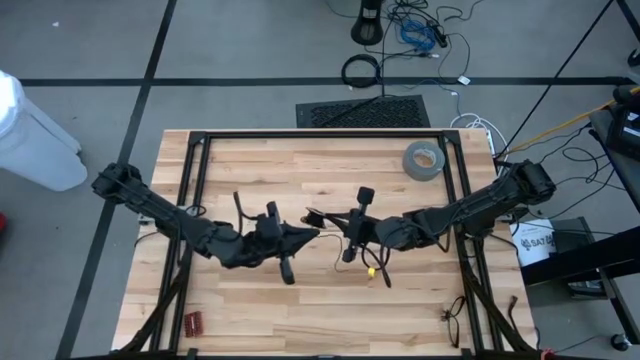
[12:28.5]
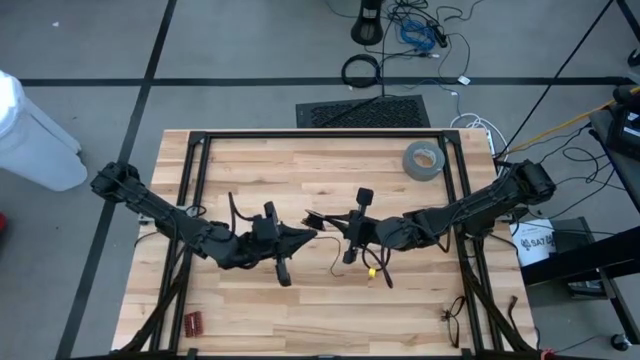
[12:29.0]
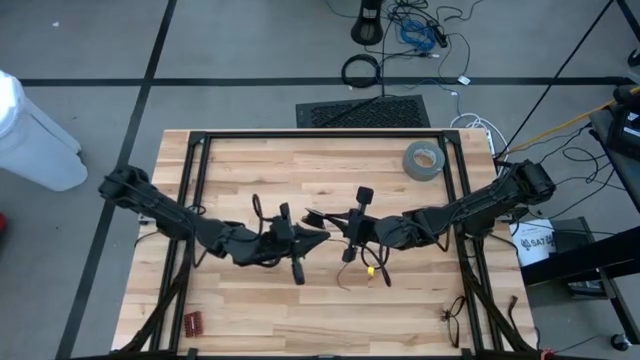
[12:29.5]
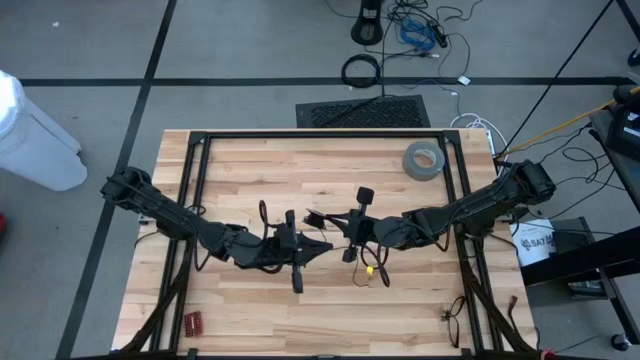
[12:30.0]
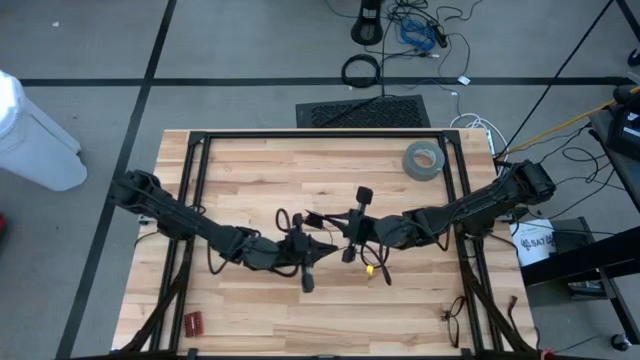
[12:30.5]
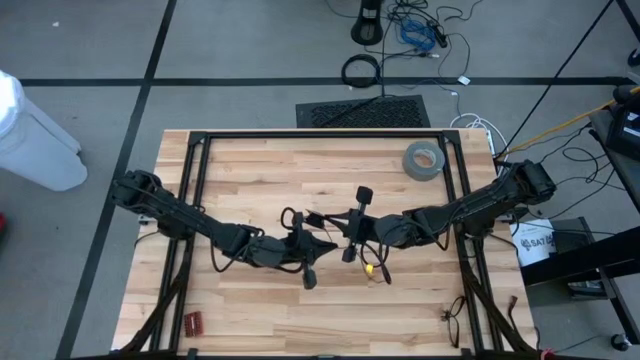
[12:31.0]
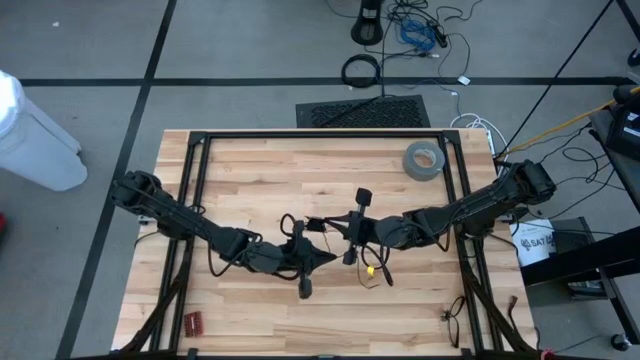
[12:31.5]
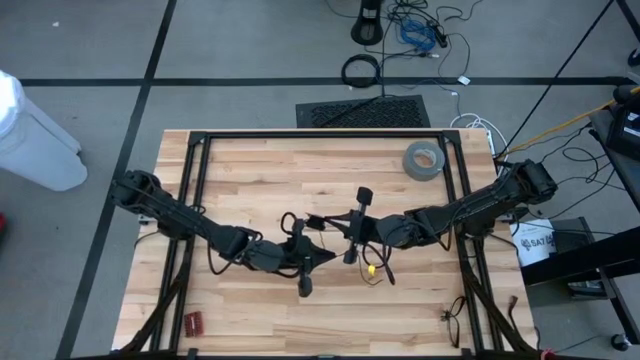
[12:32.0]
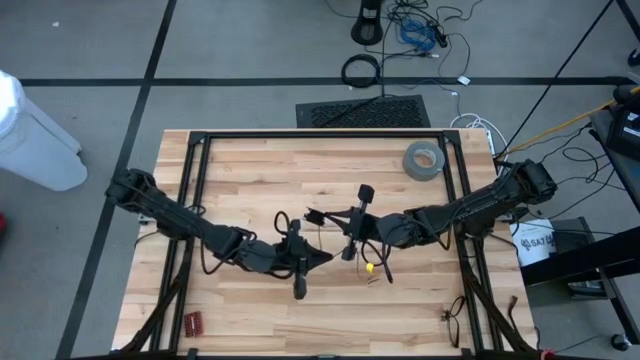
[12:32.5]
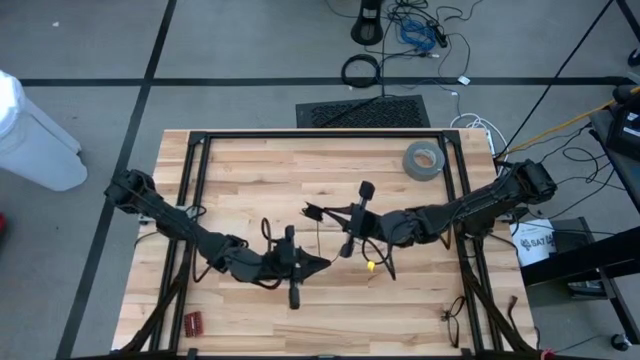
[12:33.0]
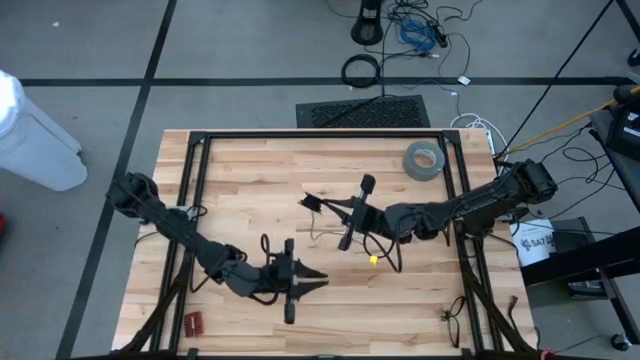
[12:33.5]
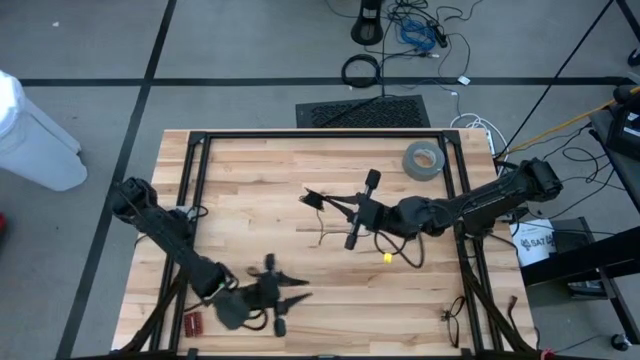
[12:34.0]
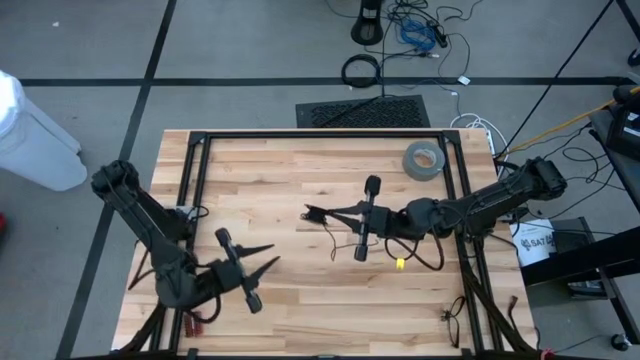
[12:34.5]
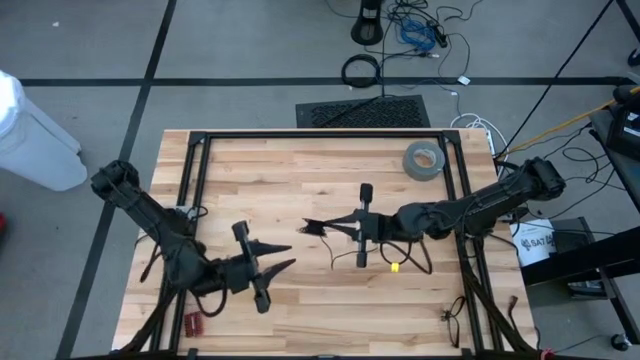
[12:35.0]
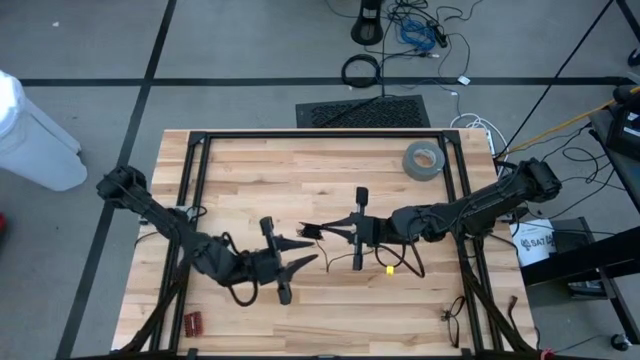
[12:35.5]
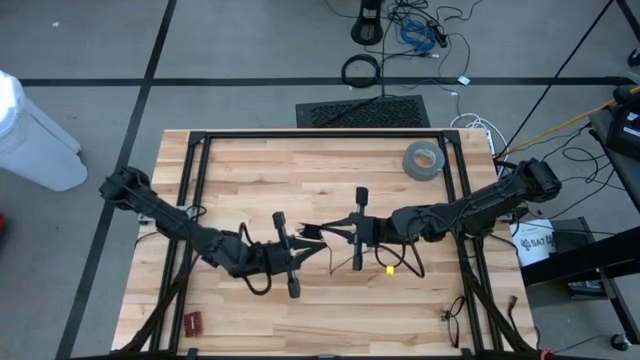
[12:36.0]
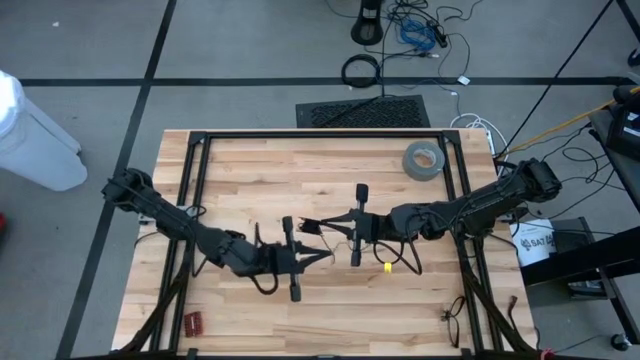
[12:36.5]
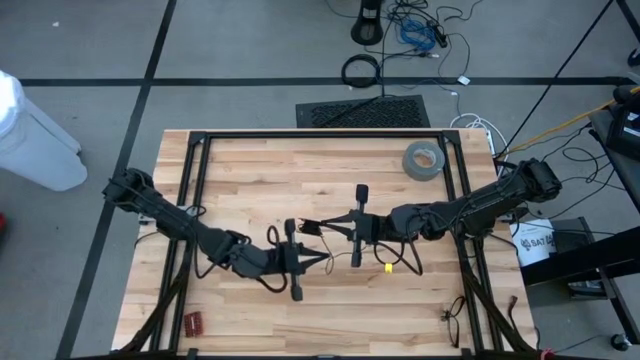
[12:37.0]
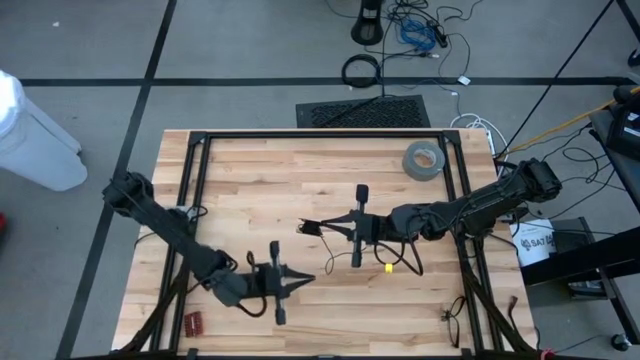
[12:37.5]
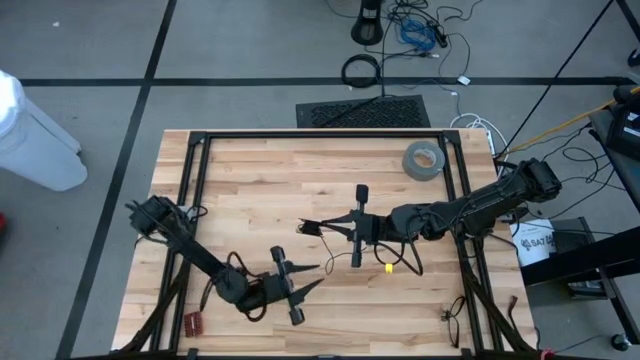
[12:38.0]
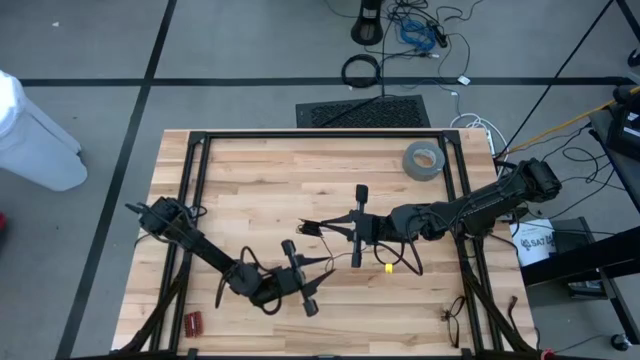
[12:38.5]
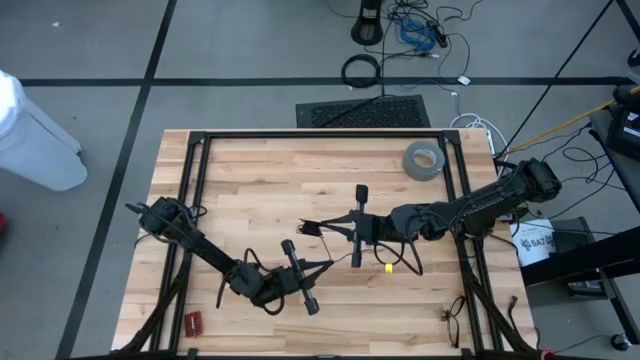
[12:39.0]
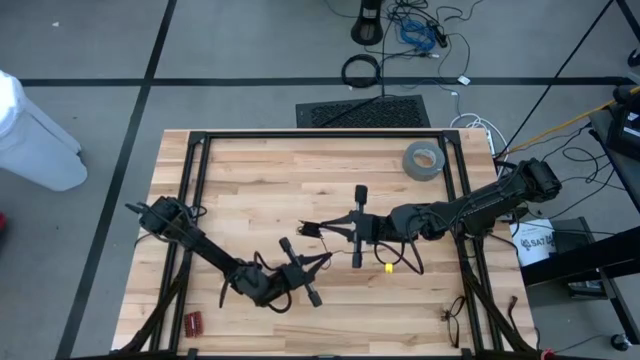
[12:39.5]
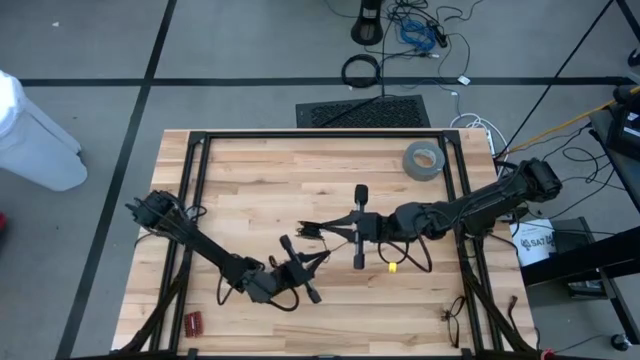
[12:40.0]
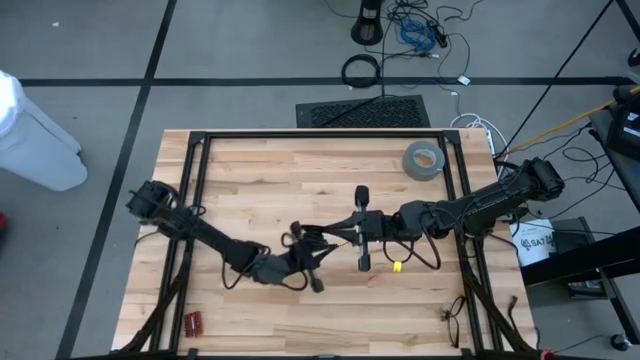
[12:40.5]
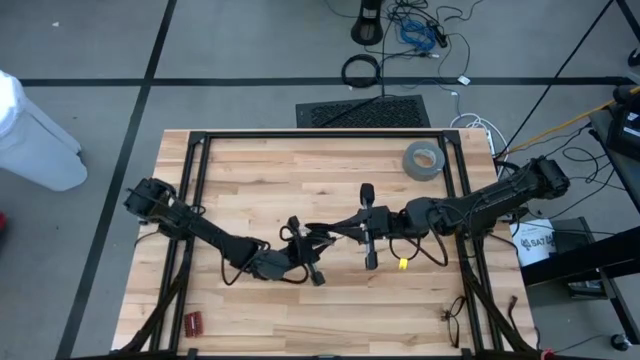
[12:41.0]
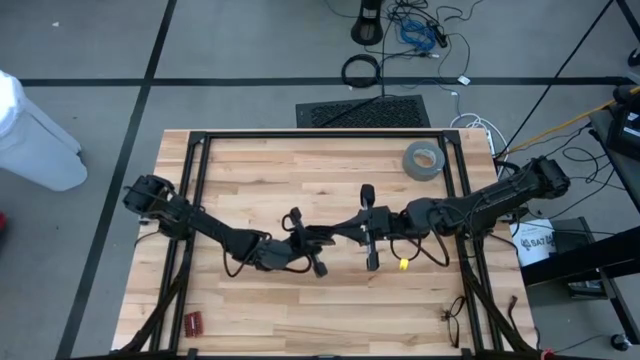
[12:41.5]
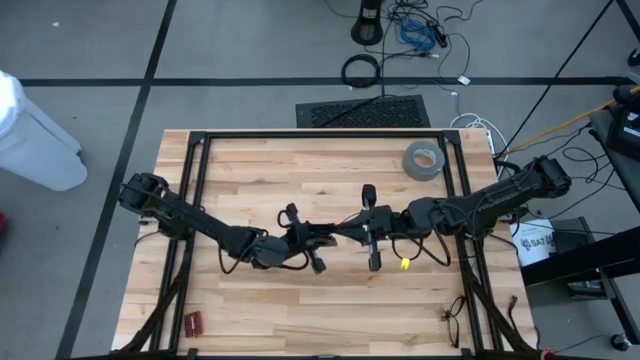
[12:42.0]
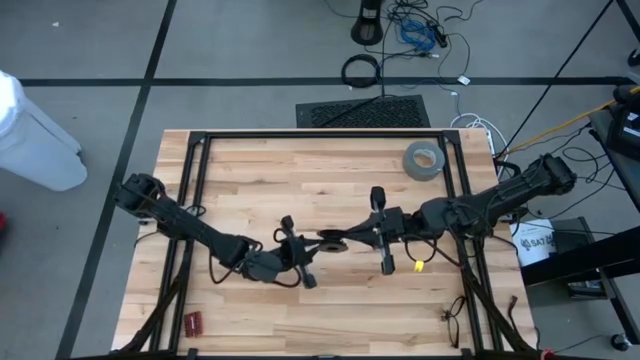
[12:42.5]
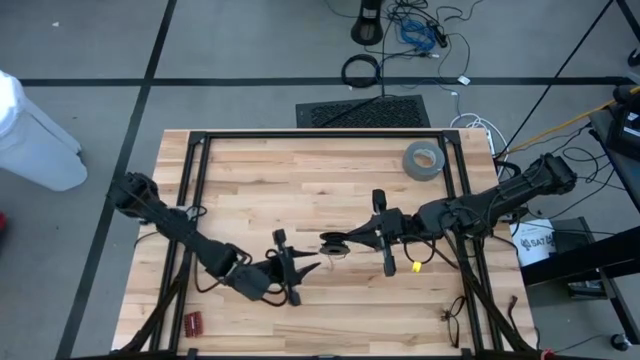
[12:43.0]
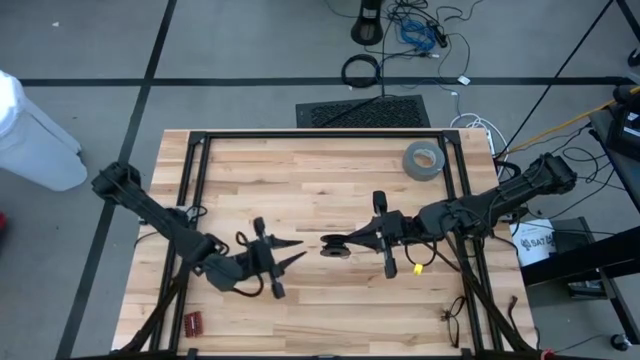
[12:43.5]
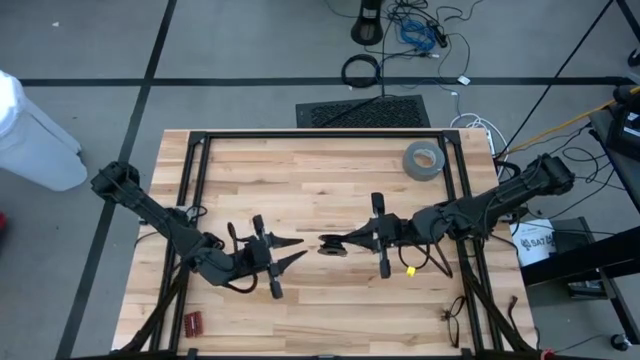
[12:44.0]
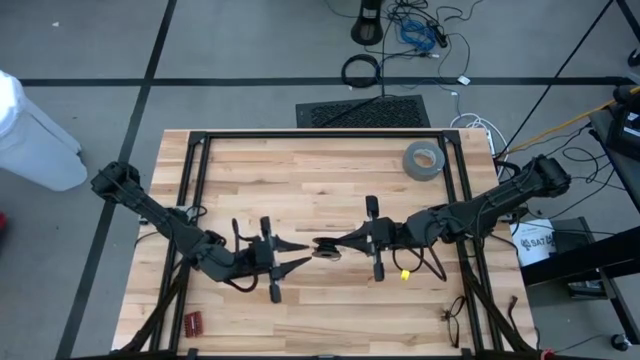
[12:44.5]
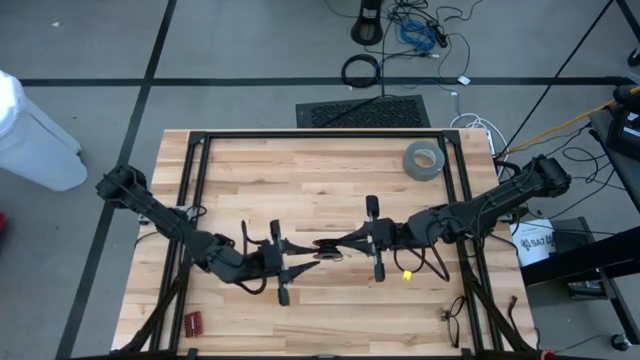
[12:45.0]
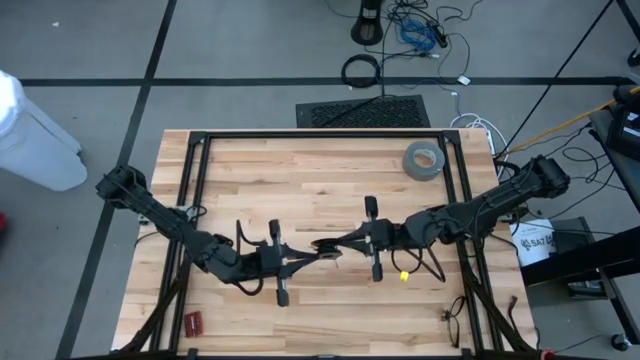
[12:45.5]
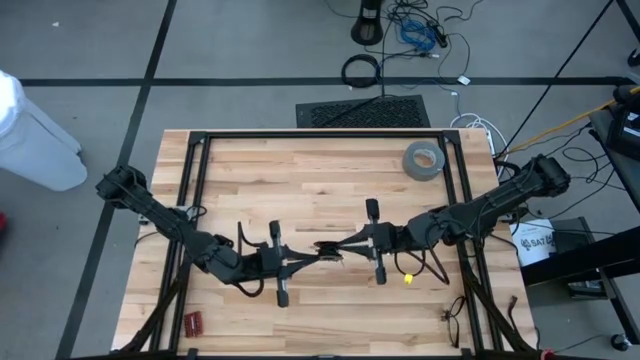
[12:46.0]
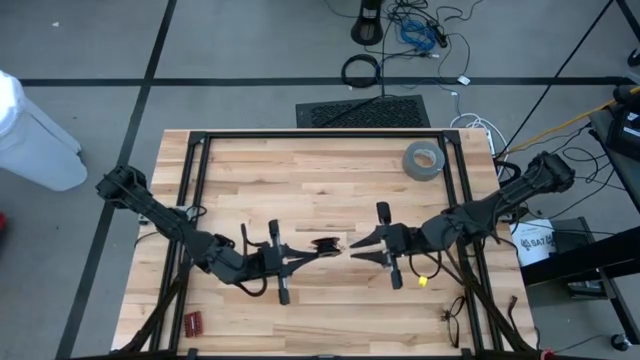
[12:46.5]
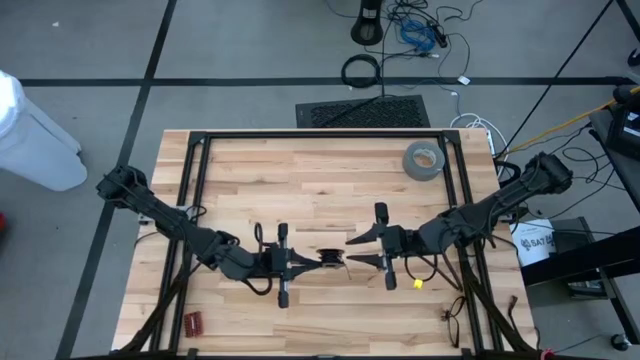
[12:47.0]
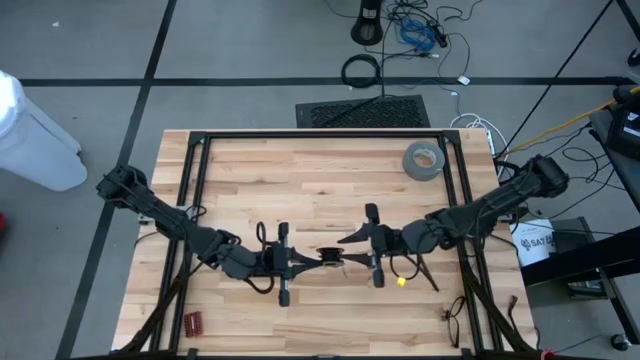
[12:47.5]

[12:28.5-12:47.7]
Task: Coil cords
Coil the black wire onto the spool
